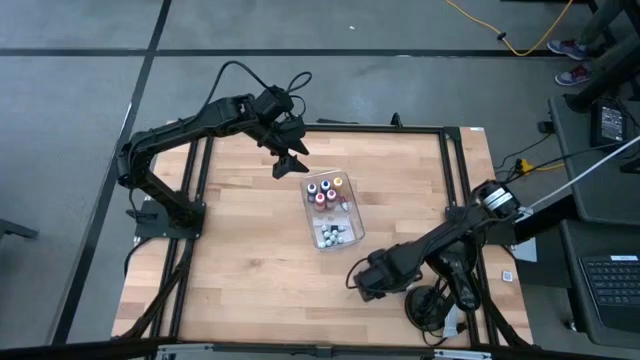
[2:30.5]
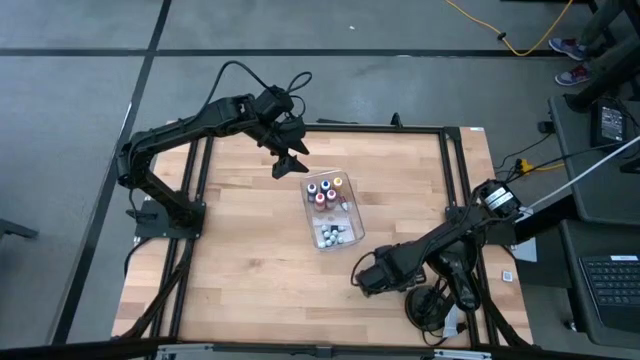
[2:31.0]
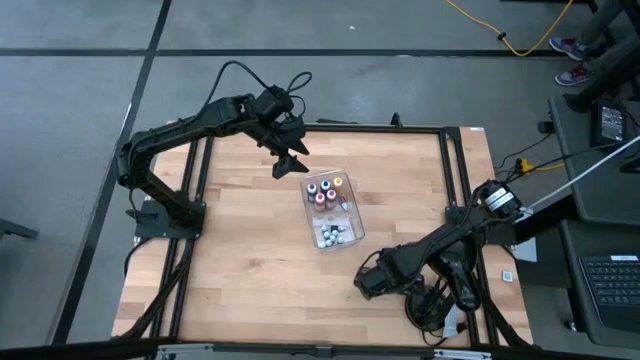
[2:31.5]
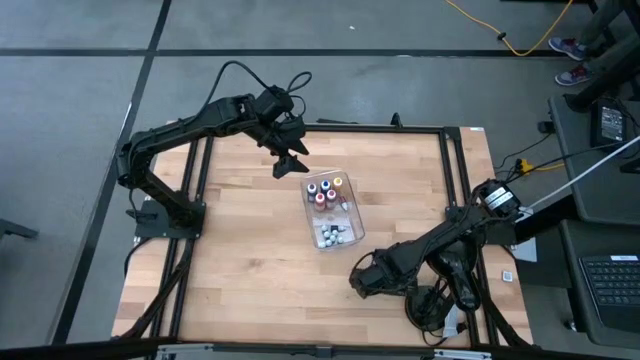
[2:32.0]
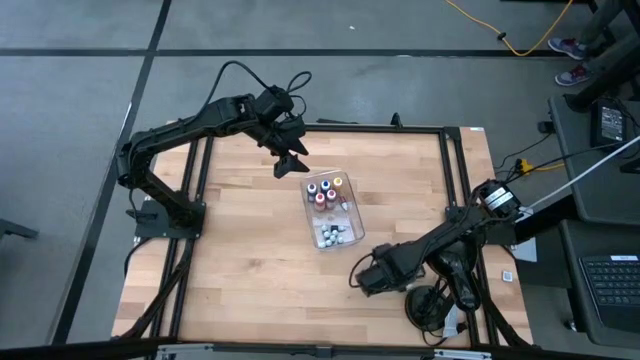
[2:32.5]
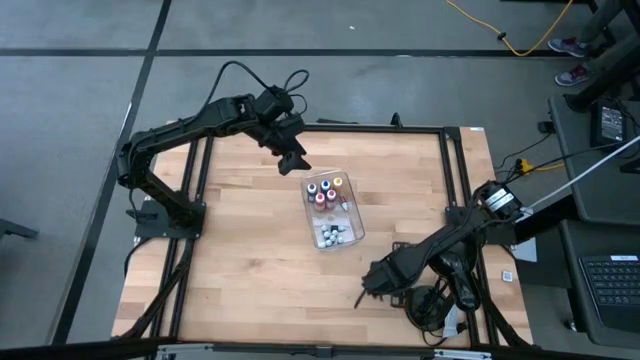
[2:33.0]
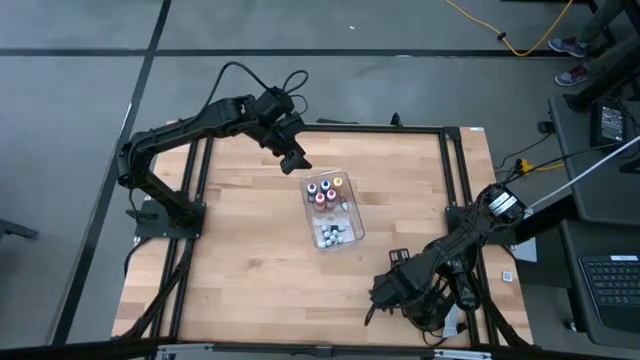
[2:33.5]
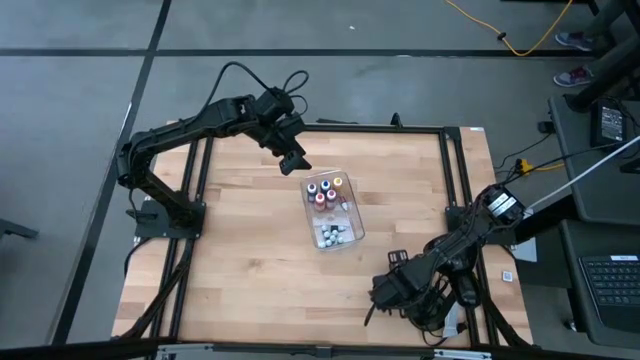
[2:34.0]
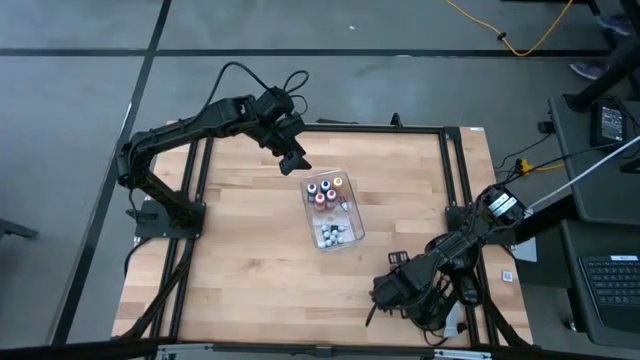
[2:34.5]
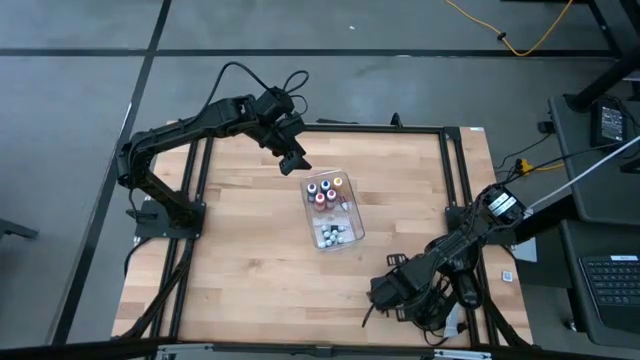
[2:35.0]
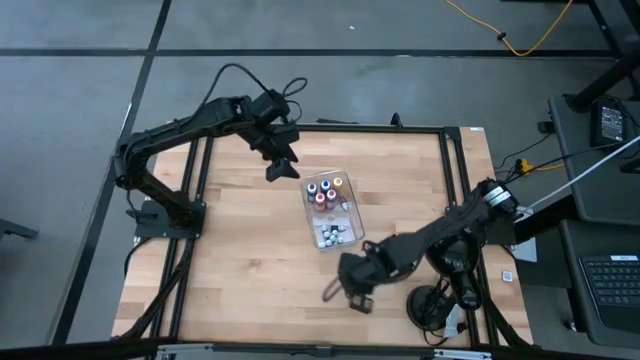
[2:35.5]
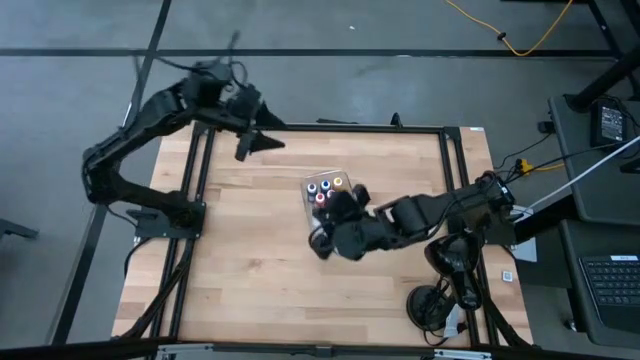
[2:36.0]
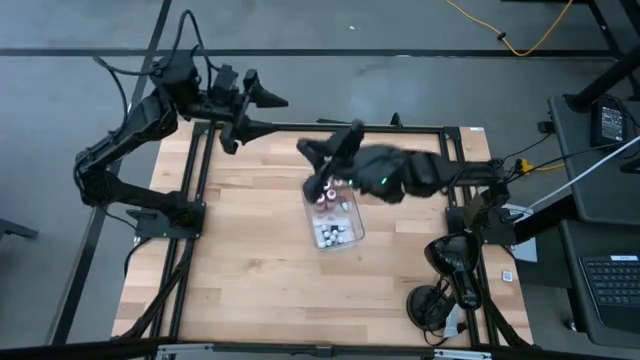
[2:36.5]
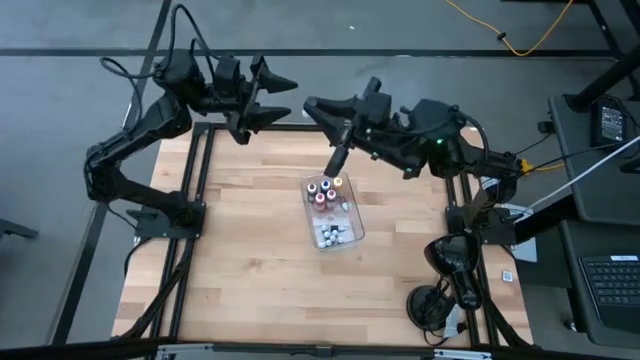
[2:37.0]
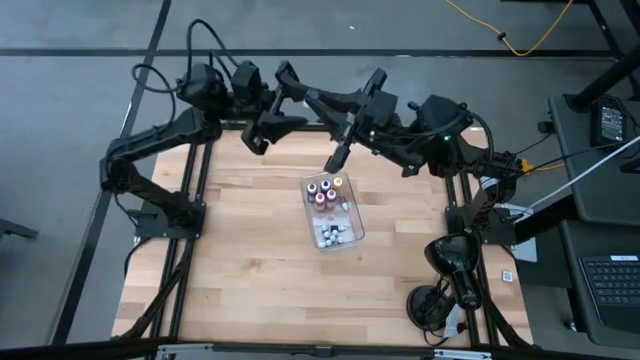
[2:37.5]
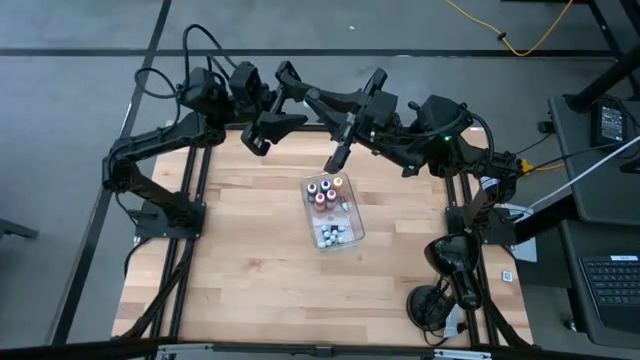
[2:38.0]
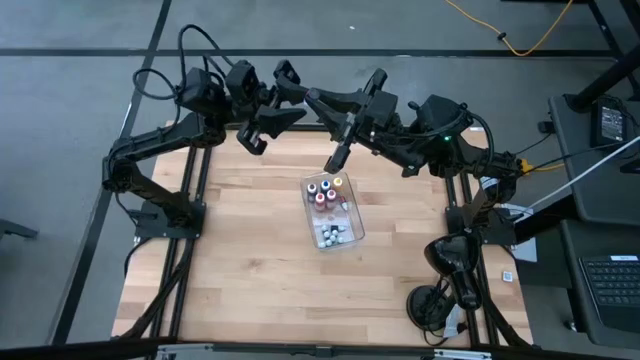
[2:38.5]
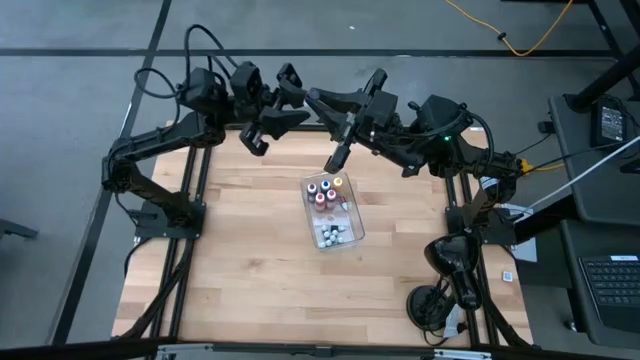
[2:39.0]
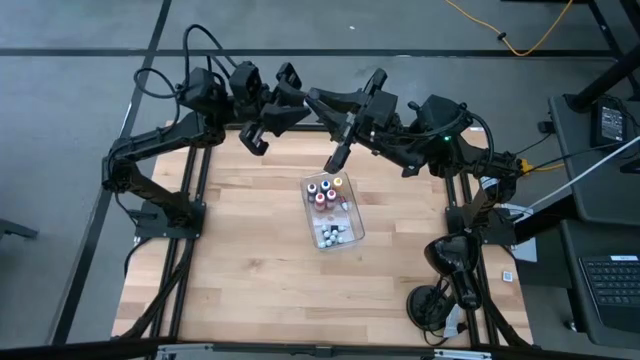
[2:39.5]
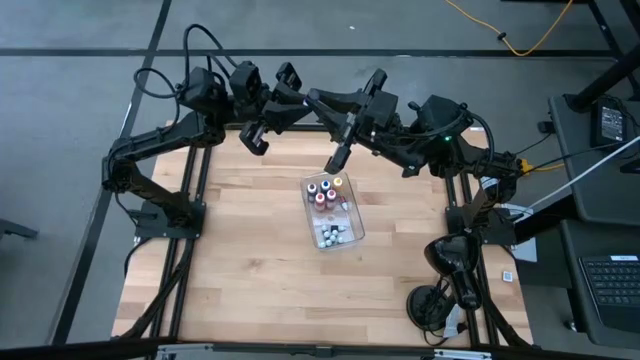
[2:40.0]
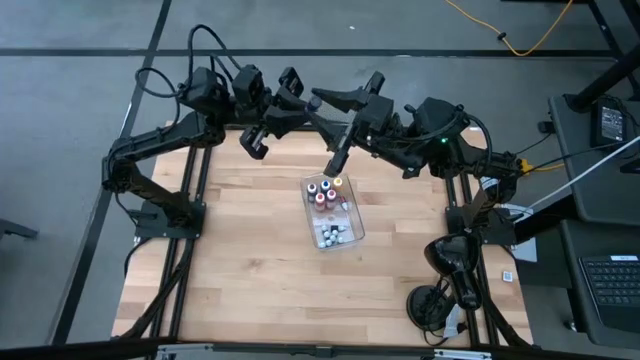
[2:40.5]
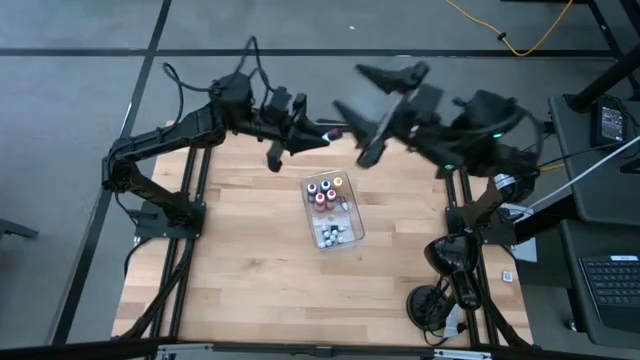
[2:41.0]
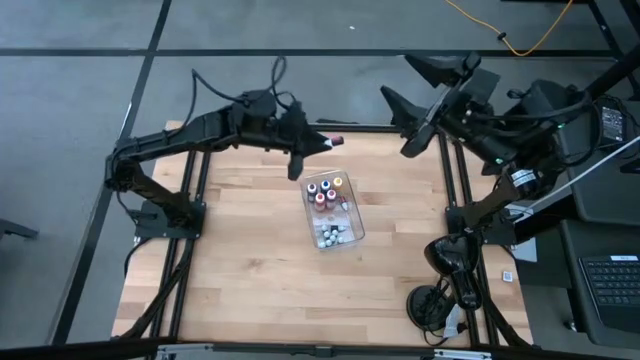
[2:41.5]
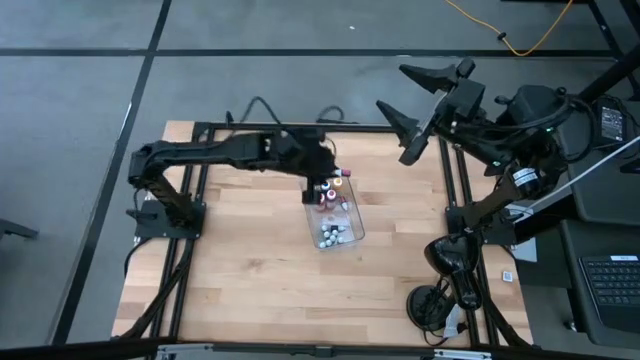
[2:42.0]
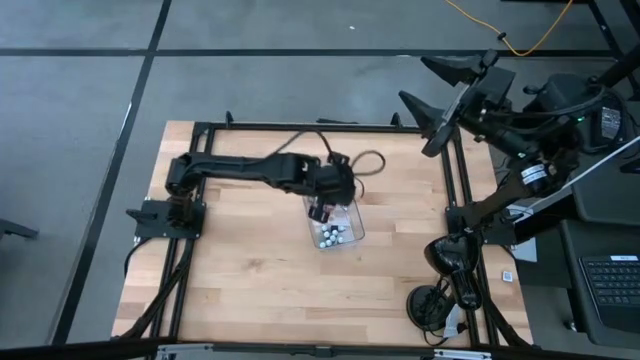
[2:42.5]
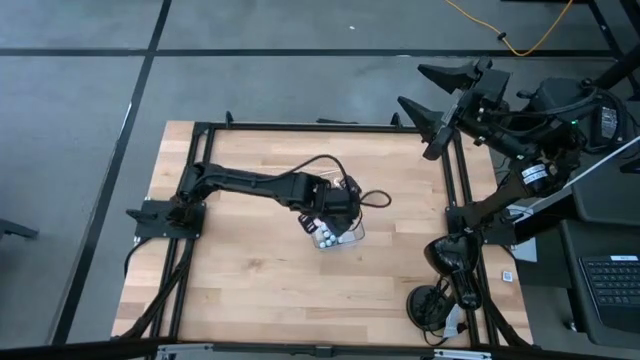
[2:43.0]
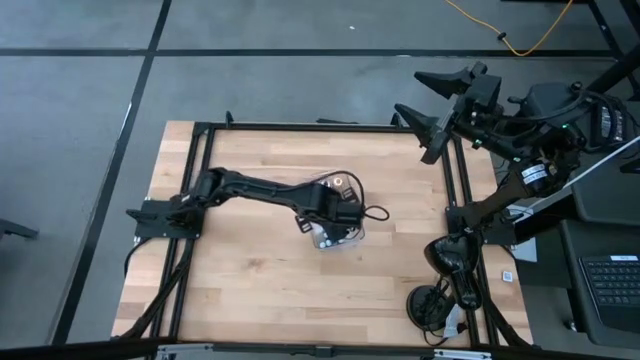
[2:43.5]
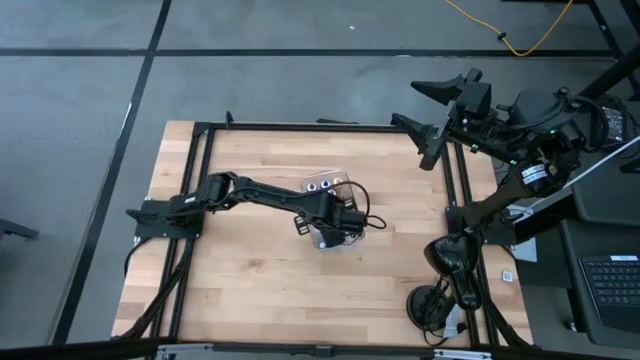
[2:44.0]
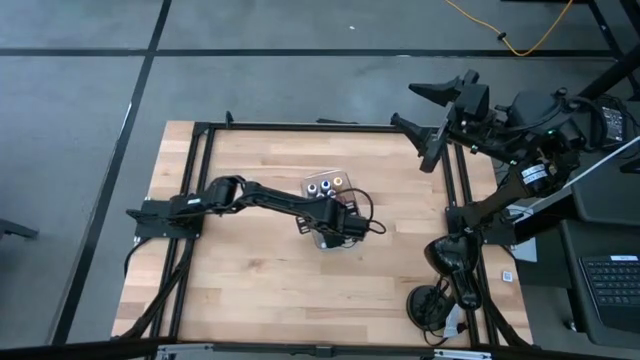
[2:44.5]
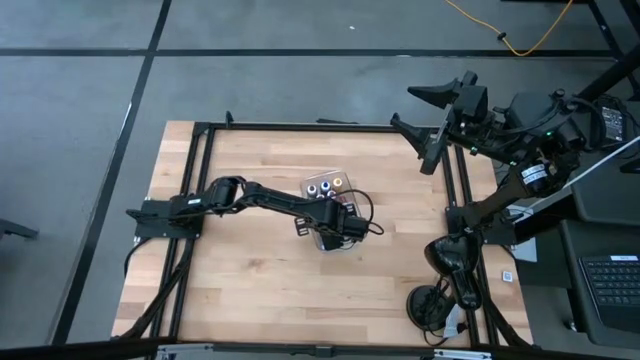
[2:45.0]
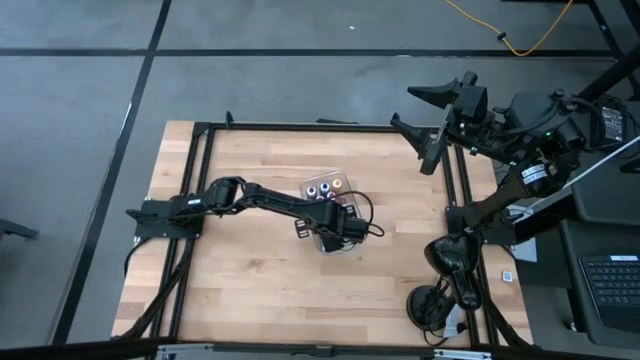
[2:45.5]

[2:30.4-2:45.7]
Task: Pick & Place food coloring
Put the small red food coloring bottle into the bottom of the bin

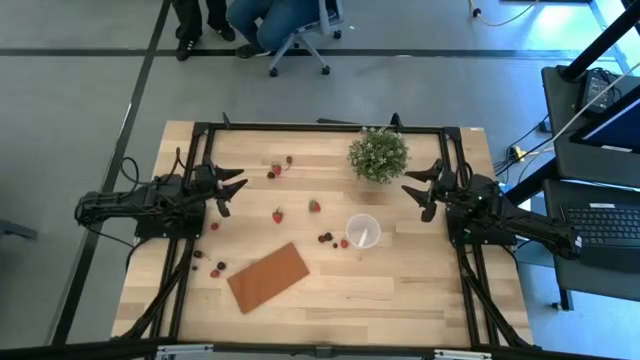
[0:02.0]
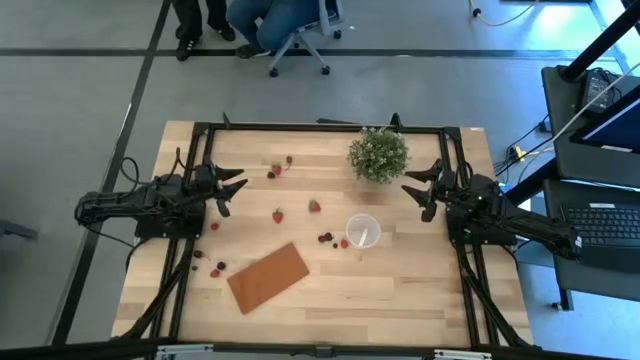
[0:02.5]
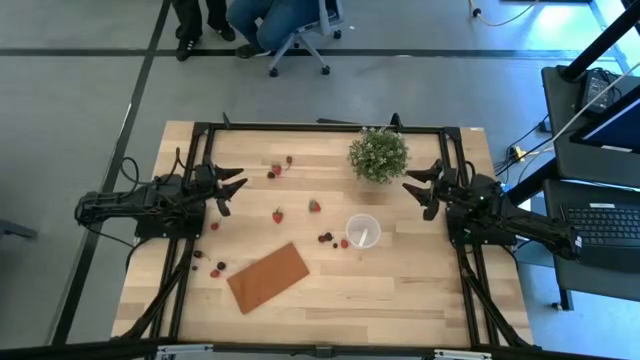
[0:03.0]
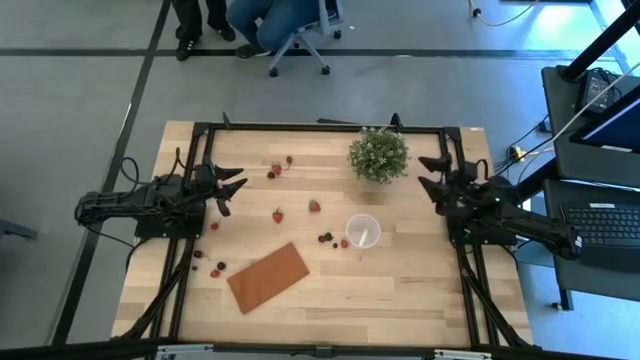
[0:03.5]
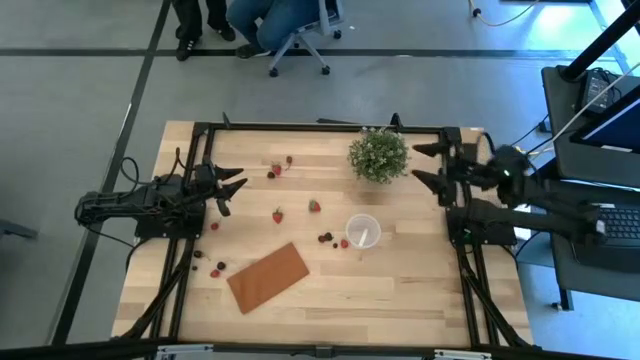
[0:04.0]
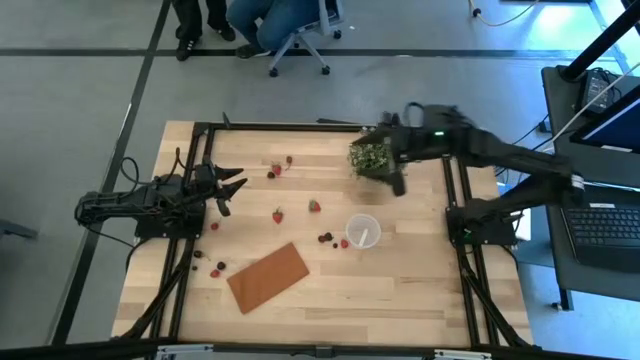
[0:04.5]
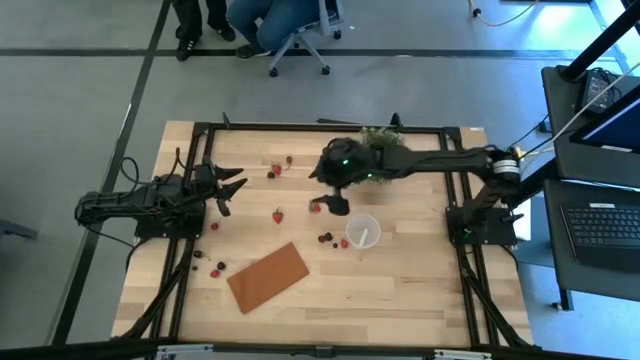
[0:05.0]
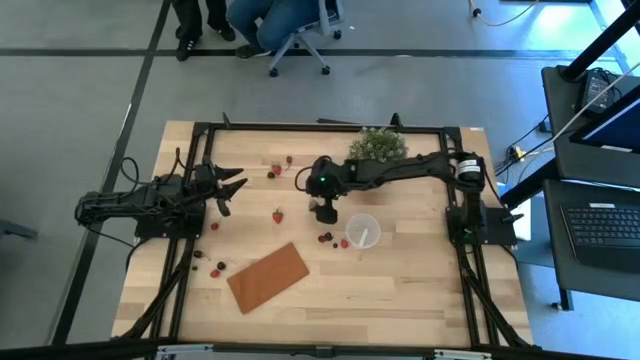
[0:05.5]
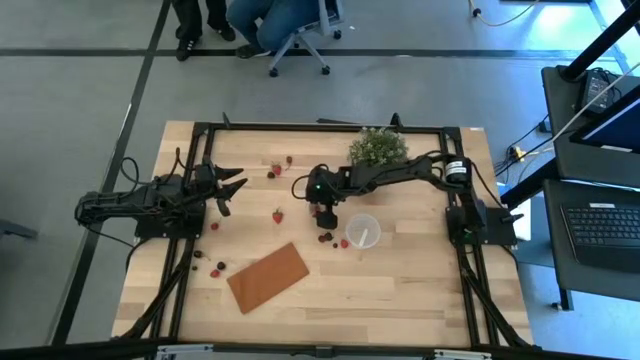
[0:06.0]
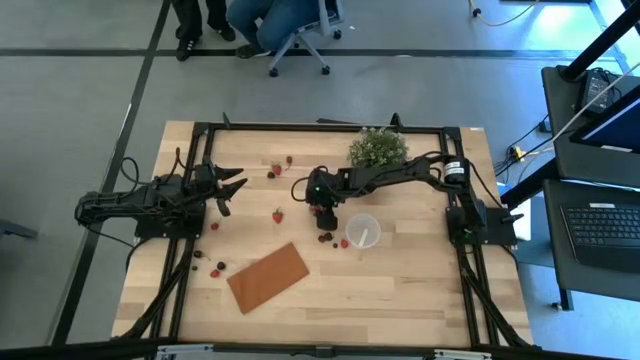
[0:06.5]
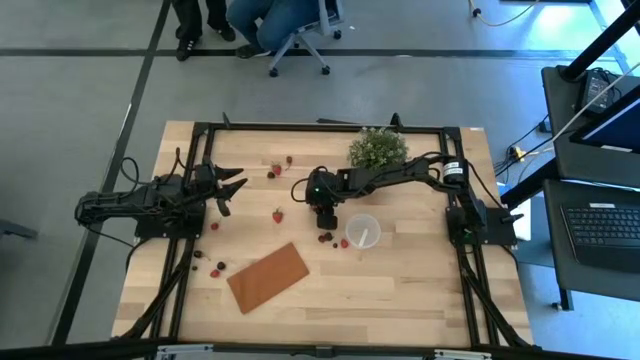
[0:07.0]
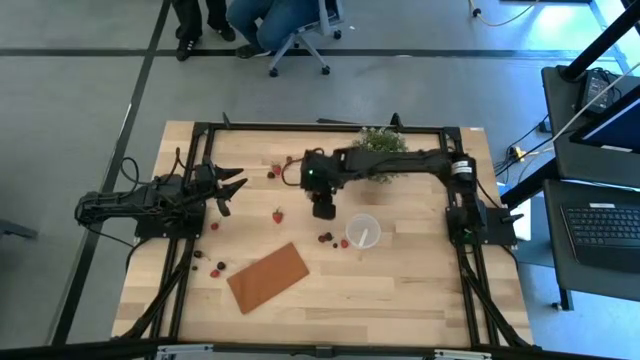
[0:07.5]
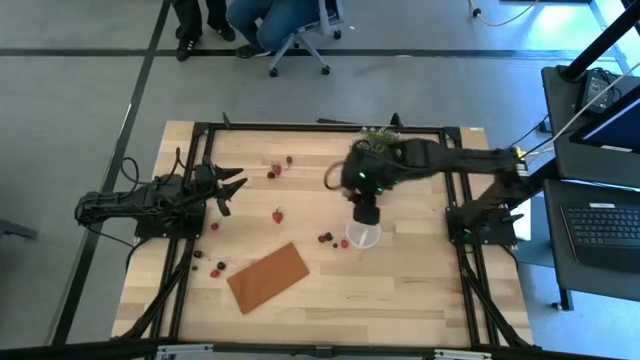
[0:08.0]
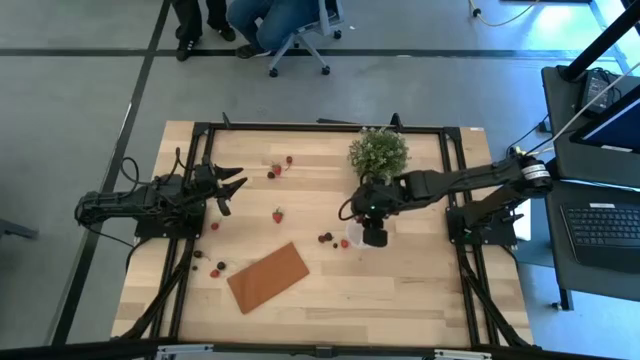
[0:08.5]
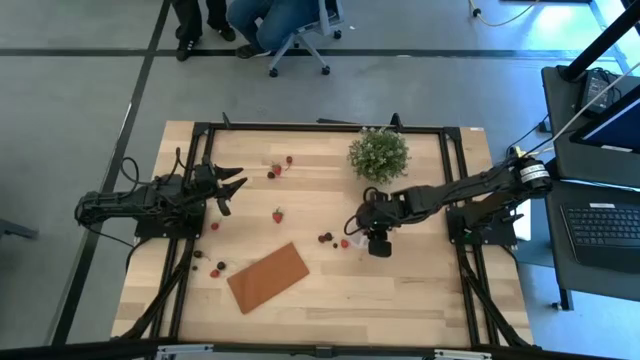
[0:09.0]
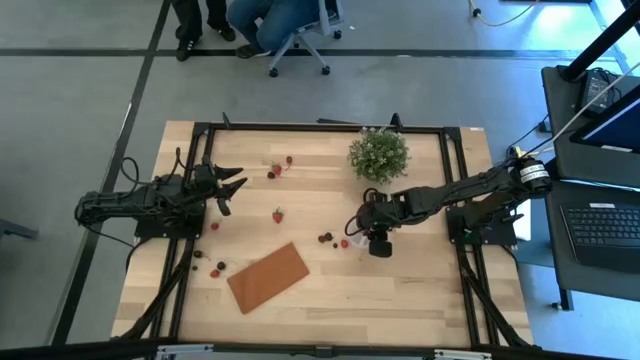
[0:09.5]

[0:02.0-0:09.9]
Task: Pick and placing Produce into tupperware
Put the red strawberry into the transparent container
